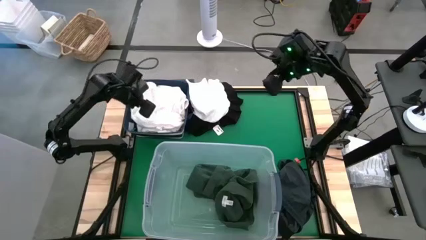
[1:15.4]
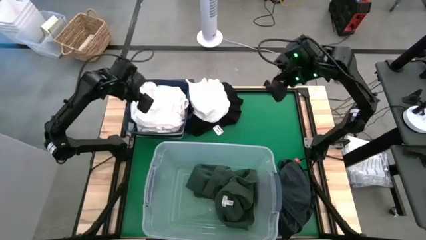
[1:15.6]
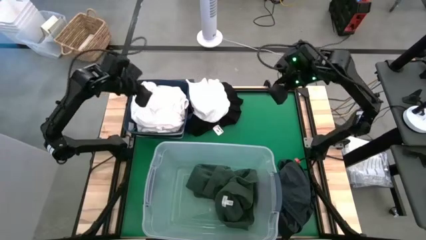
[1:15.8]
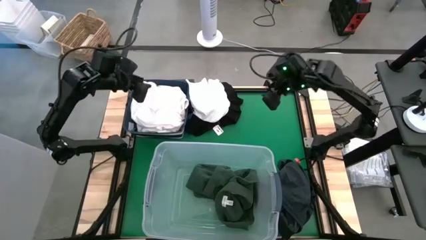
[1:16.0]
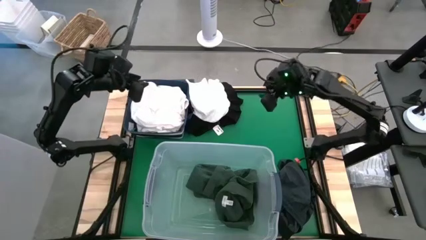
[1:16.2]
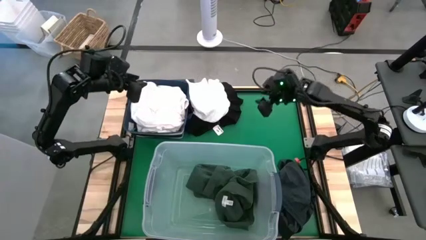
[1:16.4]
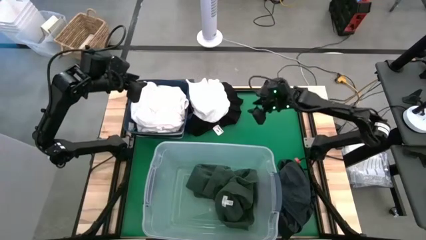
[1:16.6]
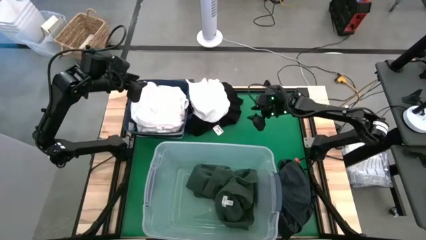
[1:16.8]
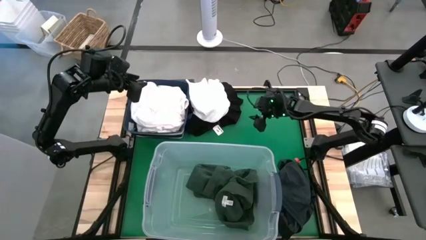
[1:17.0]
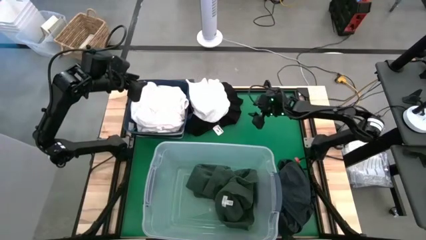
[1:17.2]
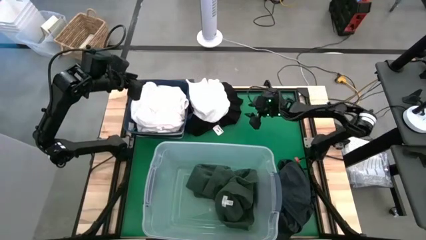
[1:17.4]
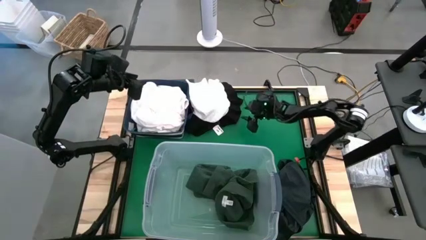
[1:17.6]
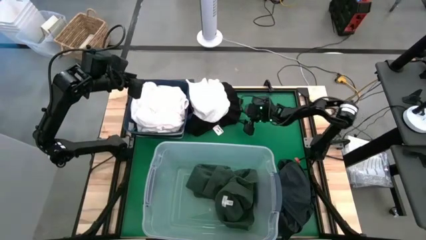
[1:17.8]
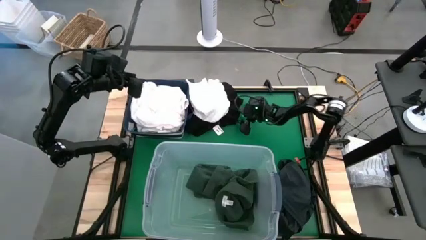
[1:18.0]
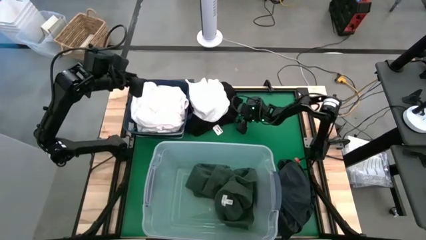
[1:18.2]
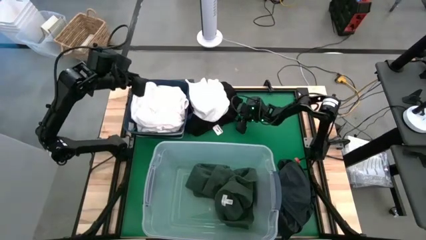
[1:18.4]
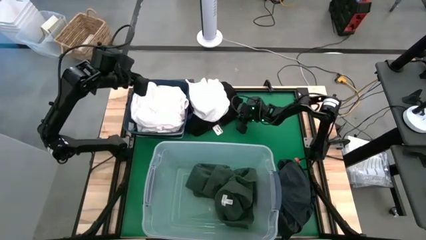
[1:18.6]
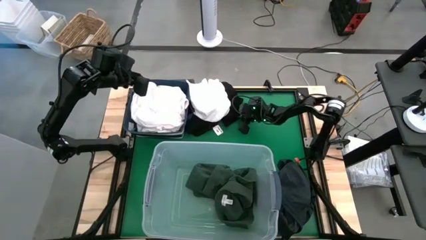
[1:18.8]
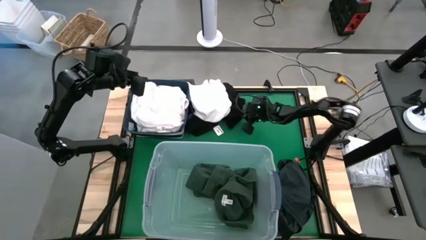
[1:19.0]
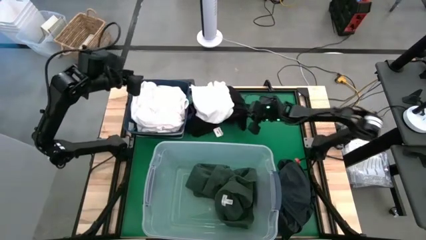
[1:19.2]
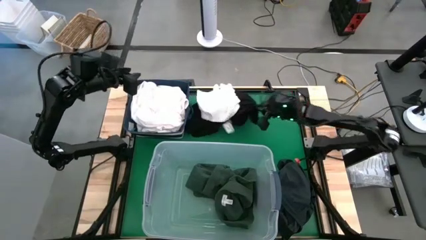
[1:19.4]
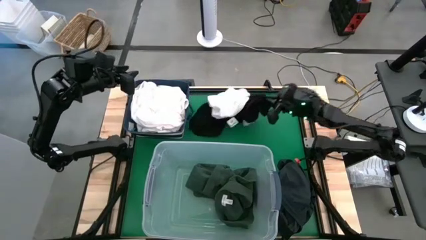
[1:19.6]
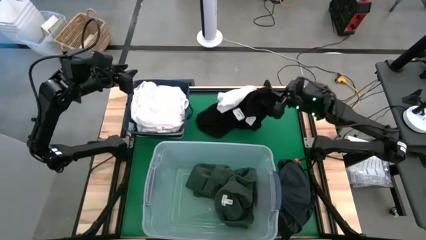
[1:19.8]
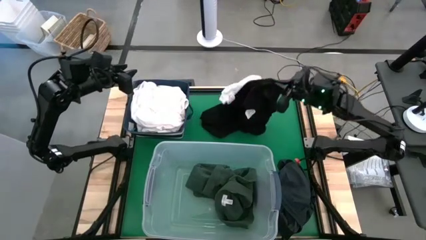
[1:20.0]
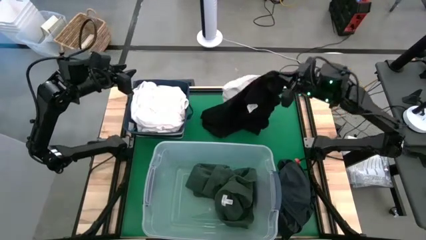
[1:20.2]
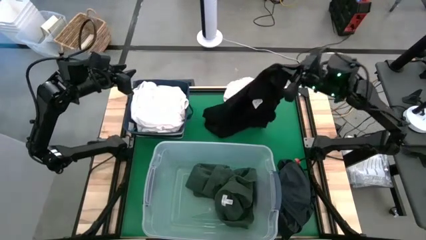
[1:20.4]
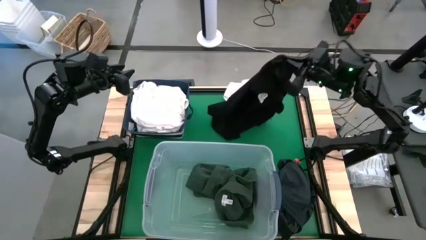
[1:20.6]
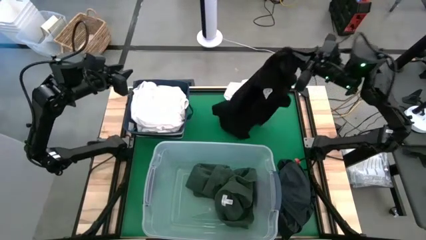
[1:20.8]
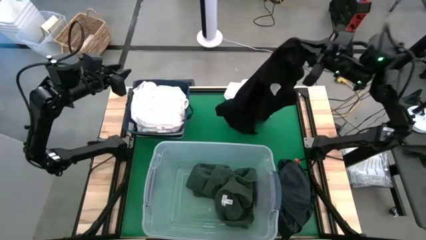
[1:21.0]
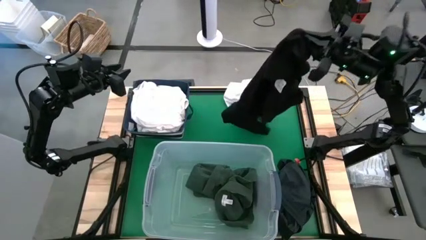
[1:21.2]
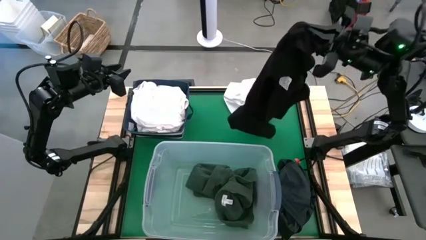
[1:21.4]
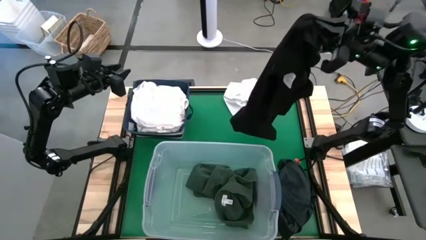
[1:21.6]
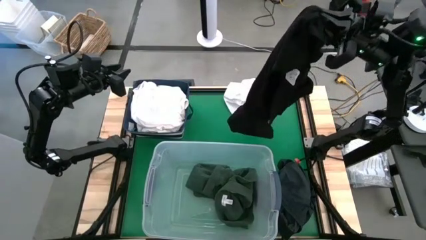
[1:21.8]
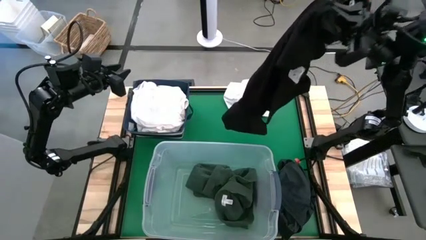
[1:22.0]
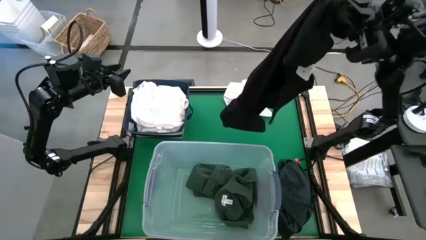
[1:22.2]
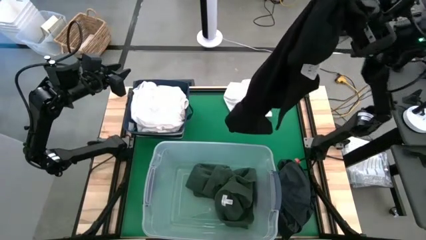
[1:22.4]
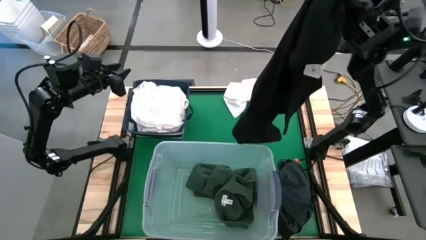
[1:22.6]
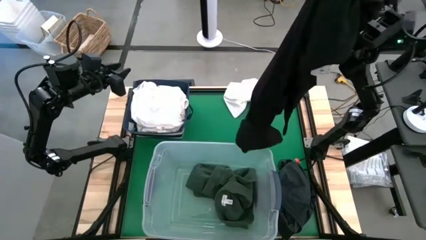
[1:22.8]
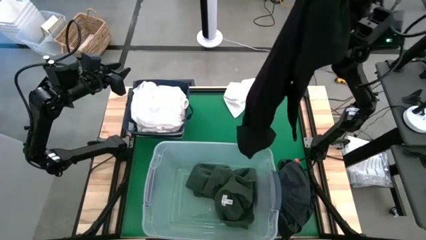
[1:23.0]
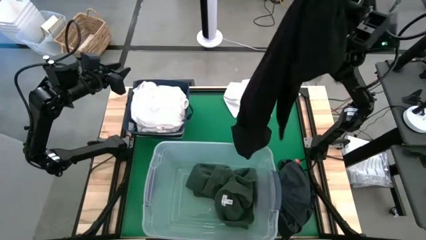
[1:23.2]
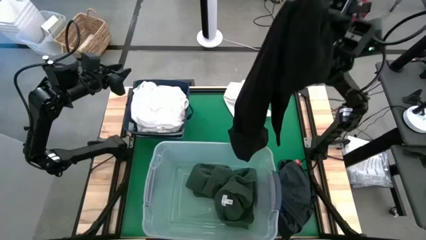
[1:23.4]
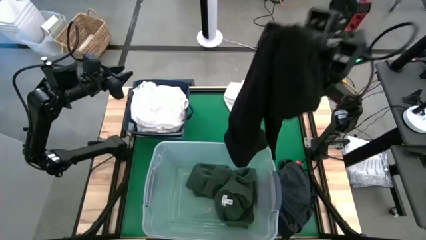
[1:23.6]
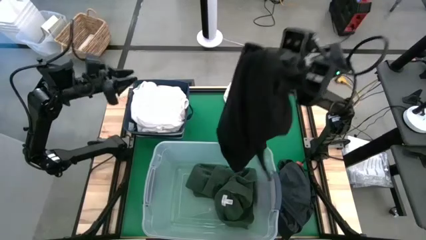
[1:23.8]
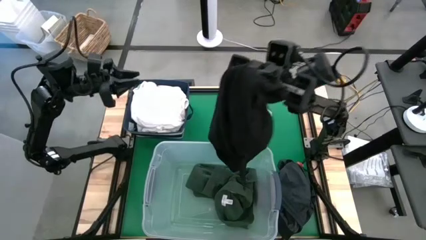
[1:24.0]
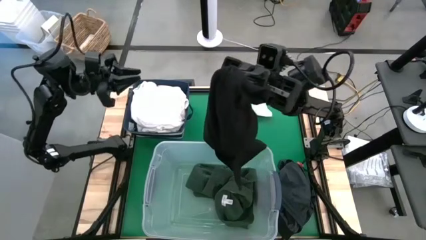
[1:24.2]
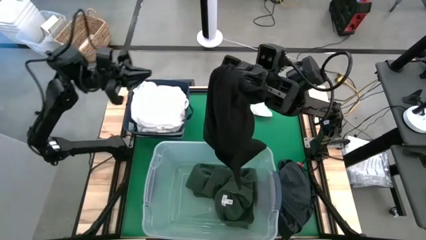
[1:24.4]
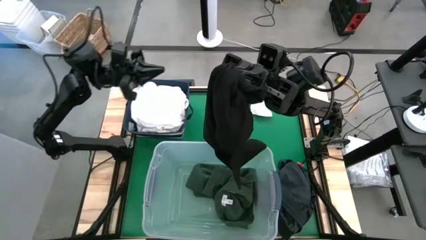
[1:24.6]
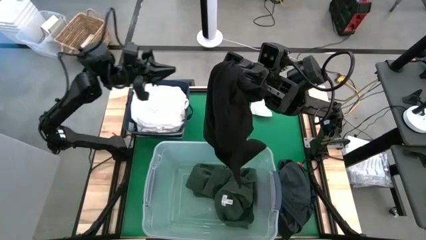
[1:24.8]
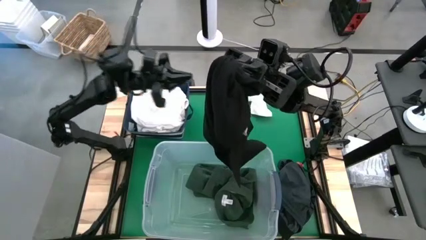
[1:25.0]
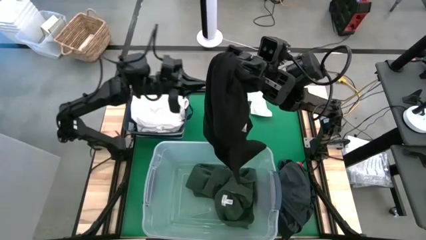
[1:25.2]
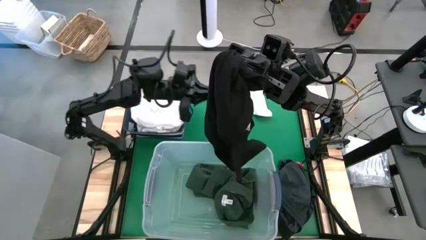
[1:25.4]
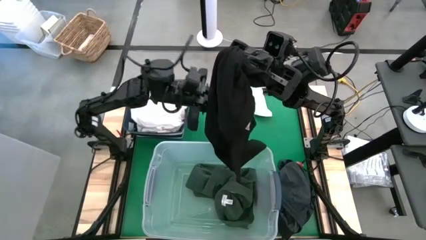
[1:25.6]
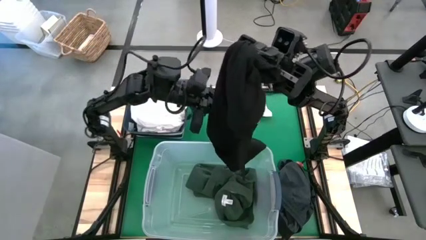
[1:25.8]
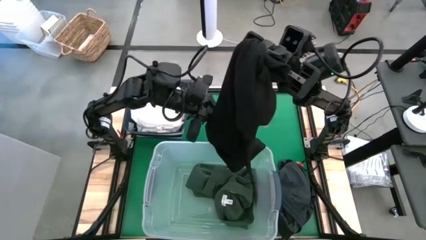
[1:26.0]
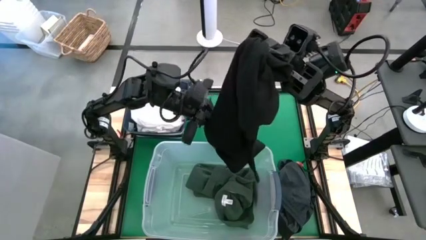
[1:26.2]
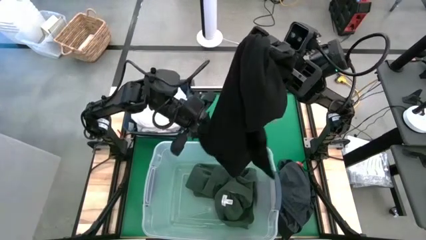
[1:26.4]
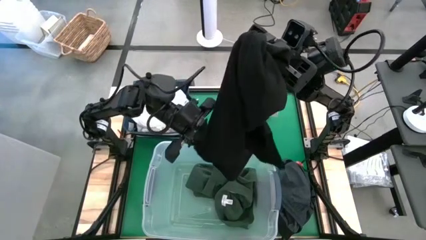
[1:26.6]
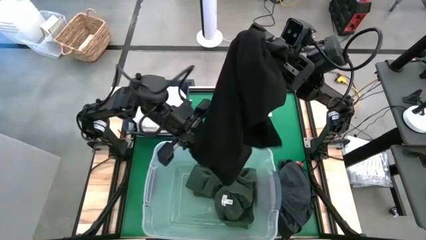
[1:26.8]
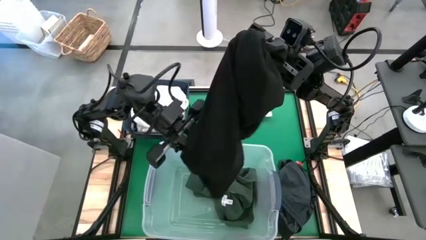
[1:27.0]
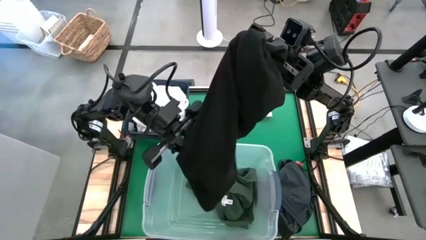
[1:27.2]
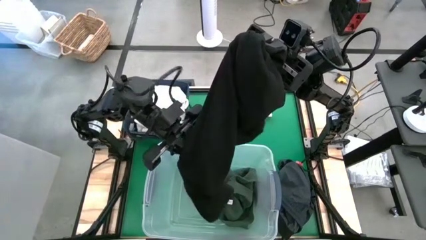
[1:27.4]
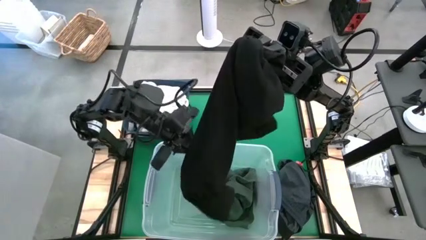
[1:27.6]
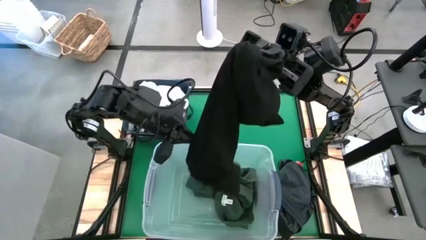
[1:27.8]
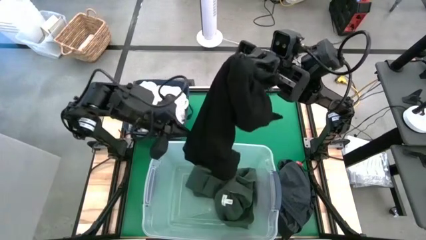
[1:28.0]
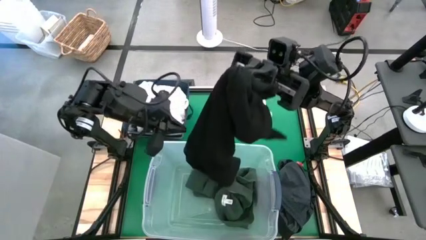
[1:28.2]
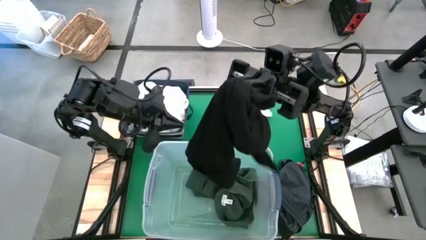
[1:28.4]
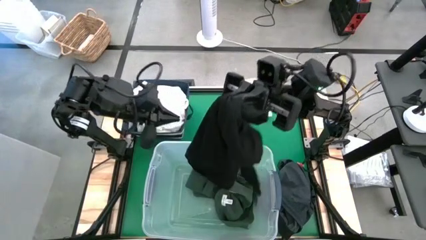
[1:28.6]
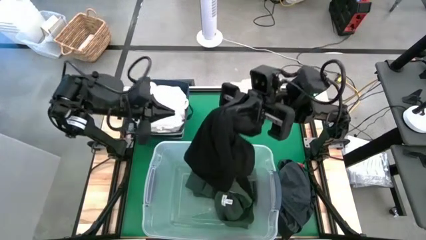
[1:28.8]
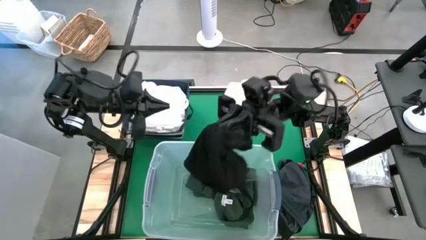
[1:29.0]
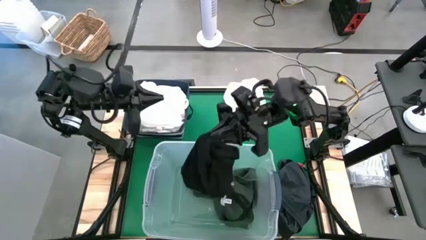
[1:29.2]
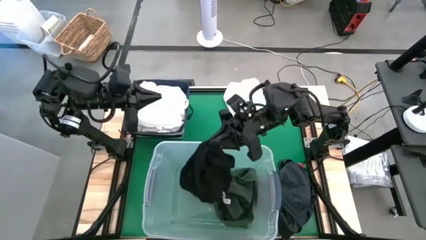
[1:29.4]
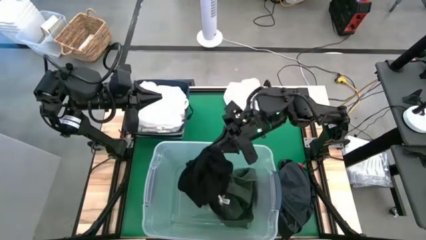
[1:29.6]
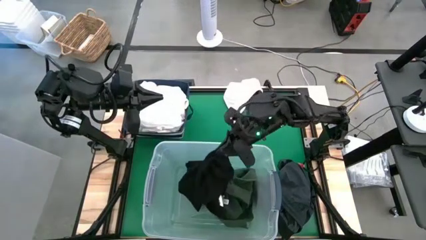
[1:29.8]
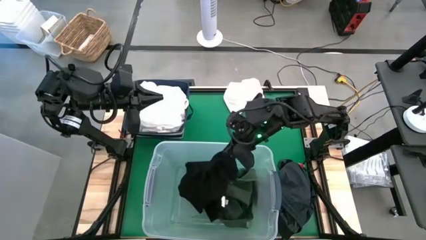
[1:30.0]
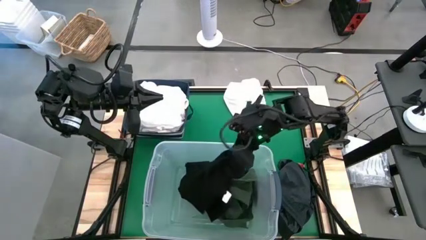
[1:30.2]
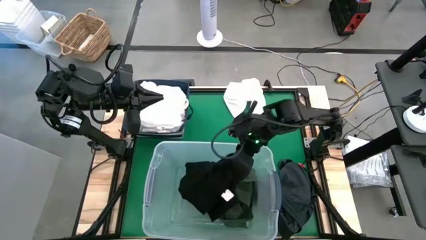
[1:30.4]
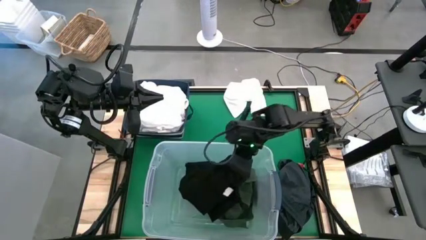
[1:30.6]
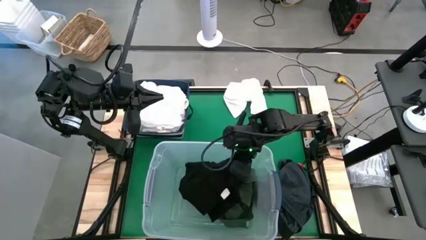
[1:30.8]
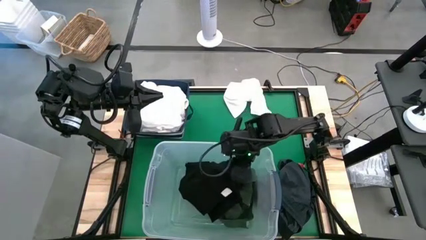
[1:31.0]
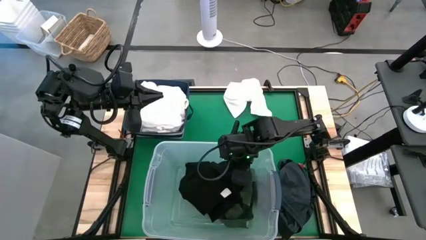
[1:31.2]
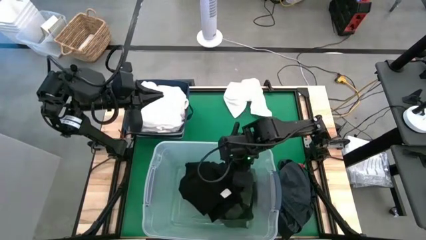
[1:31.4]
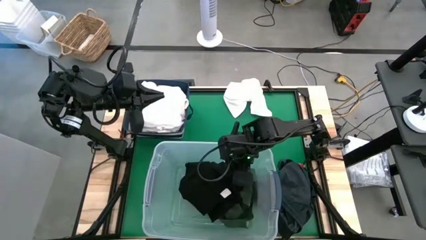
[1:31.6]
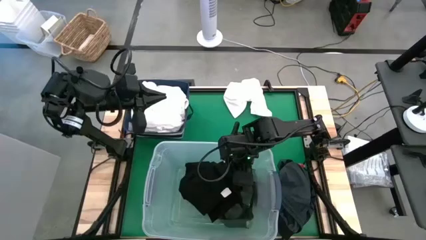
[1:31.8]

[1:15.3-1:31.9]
Put the black shirt into the transparent laundry bin
